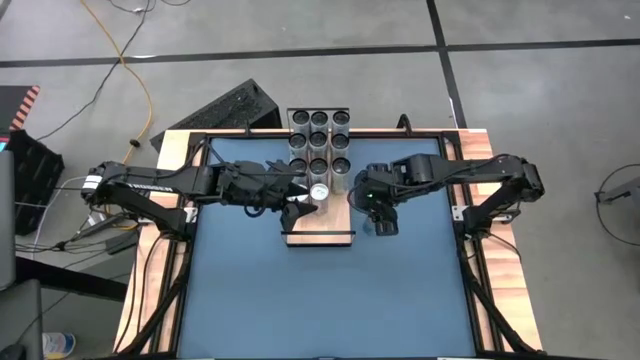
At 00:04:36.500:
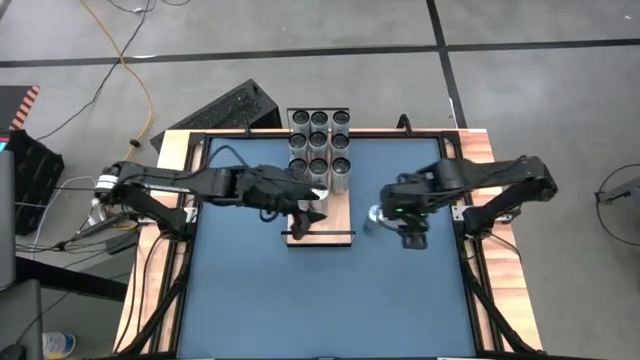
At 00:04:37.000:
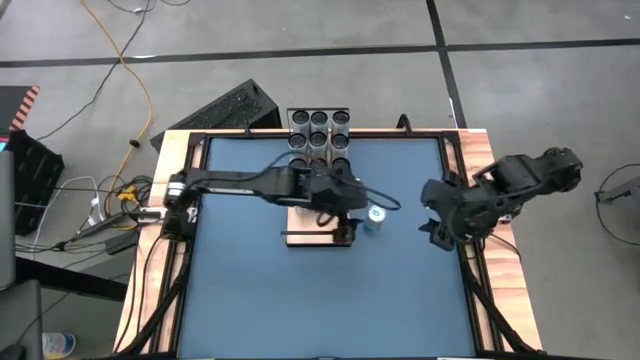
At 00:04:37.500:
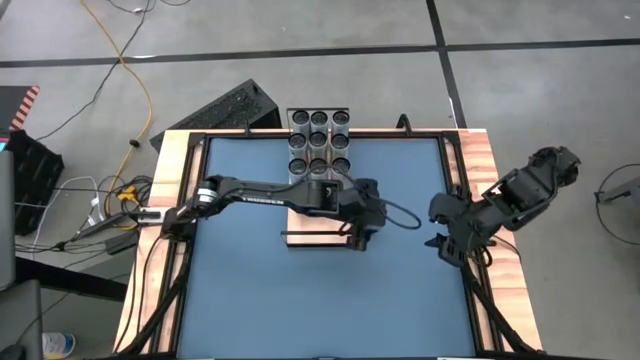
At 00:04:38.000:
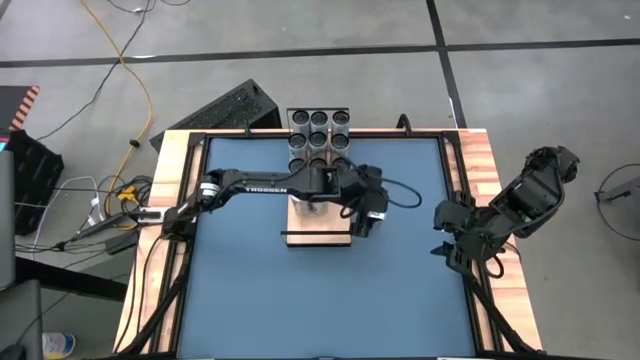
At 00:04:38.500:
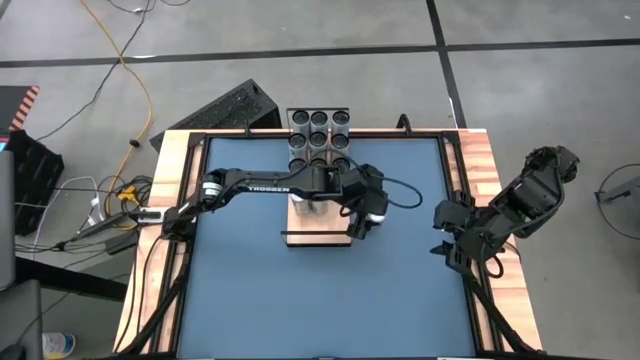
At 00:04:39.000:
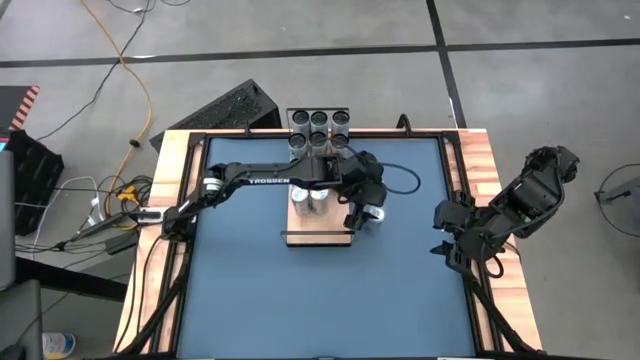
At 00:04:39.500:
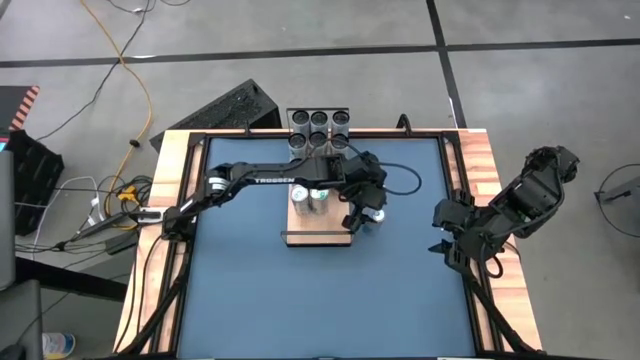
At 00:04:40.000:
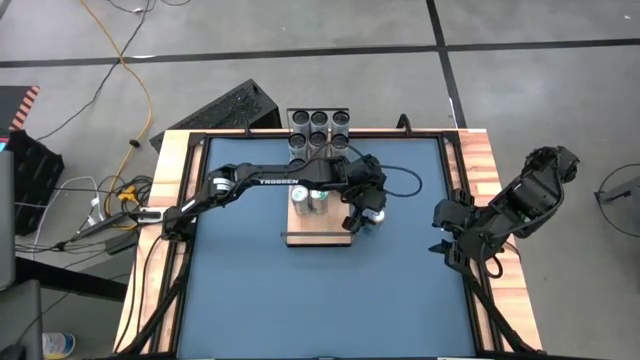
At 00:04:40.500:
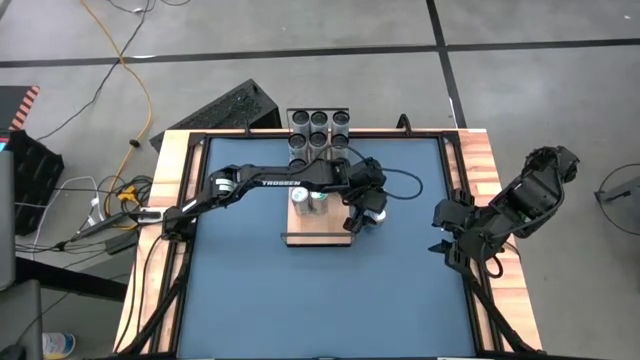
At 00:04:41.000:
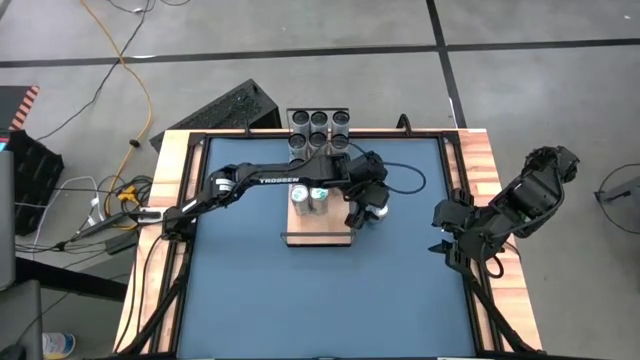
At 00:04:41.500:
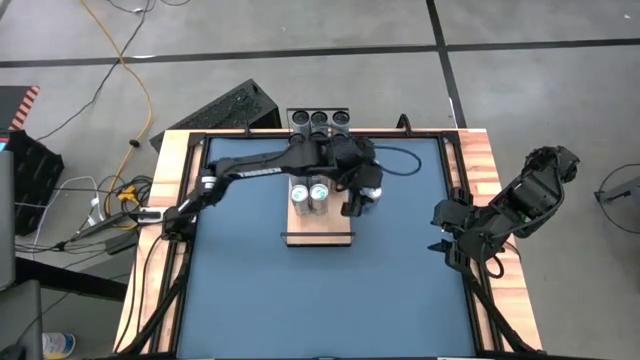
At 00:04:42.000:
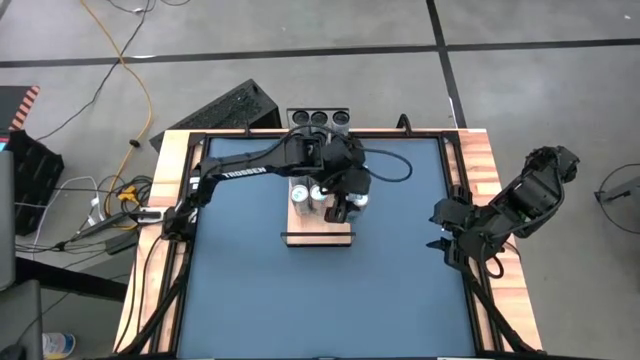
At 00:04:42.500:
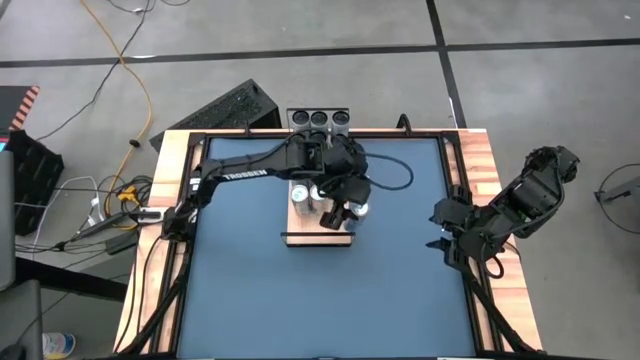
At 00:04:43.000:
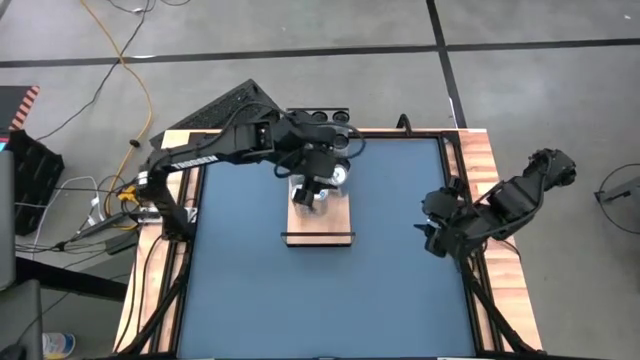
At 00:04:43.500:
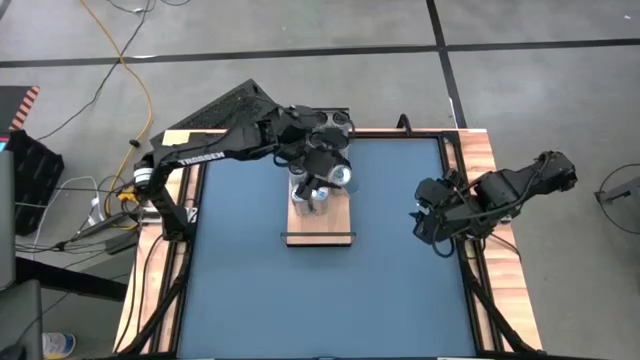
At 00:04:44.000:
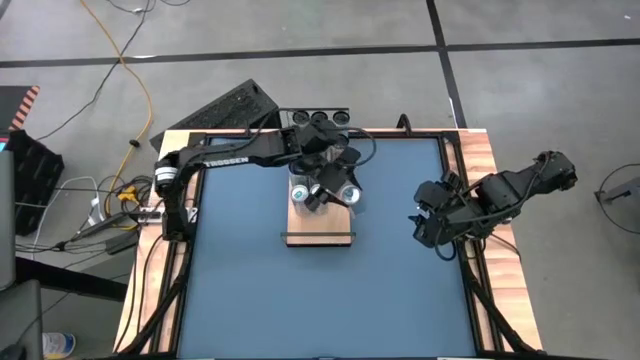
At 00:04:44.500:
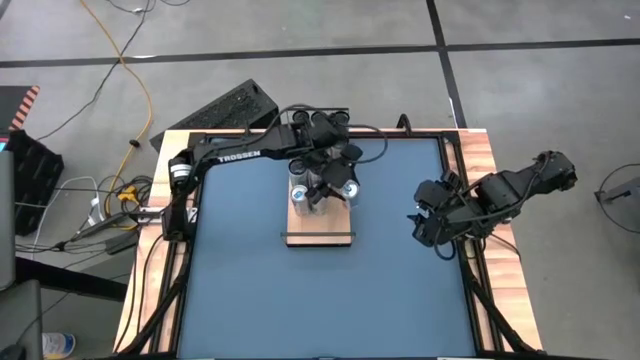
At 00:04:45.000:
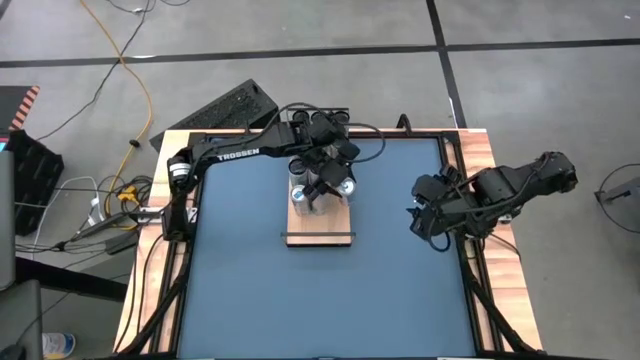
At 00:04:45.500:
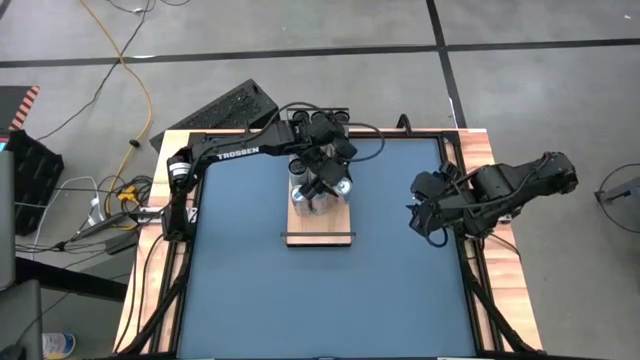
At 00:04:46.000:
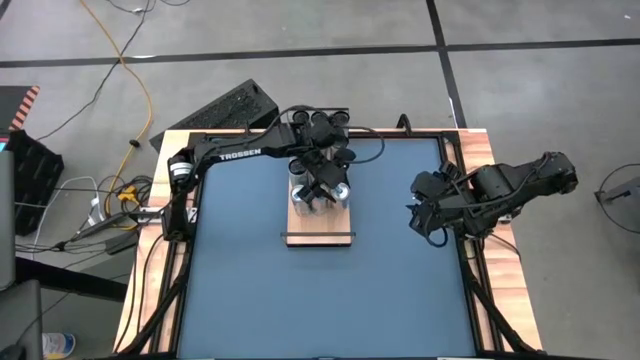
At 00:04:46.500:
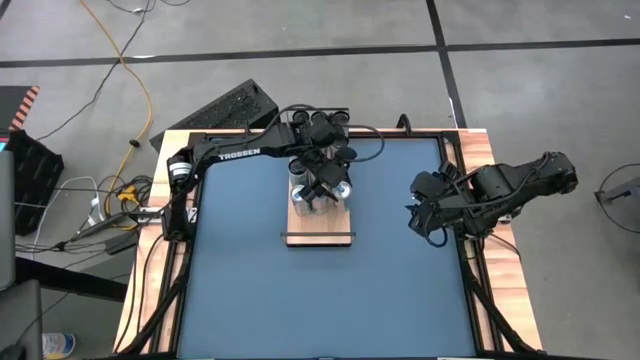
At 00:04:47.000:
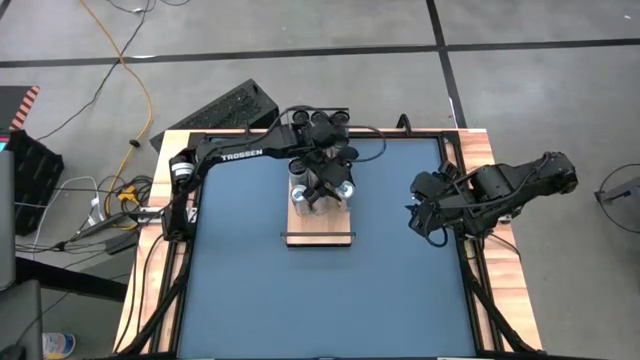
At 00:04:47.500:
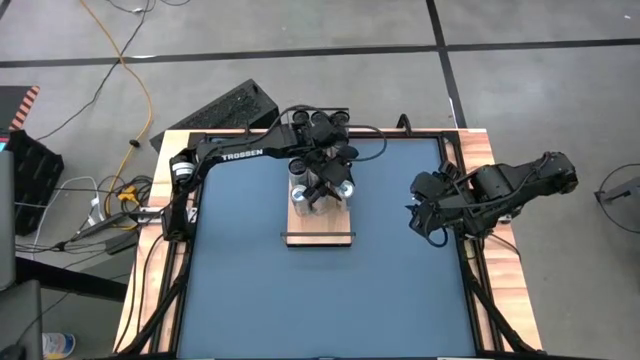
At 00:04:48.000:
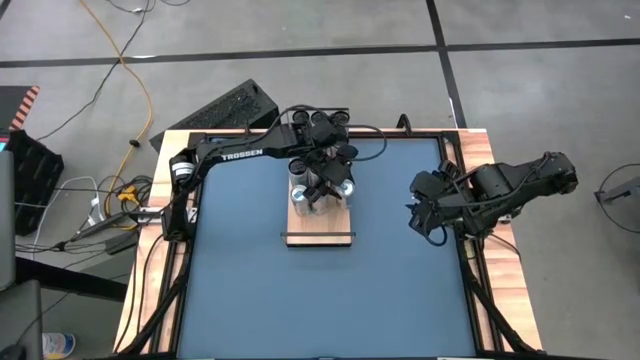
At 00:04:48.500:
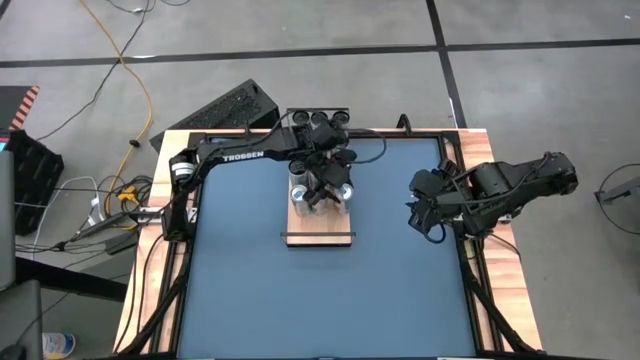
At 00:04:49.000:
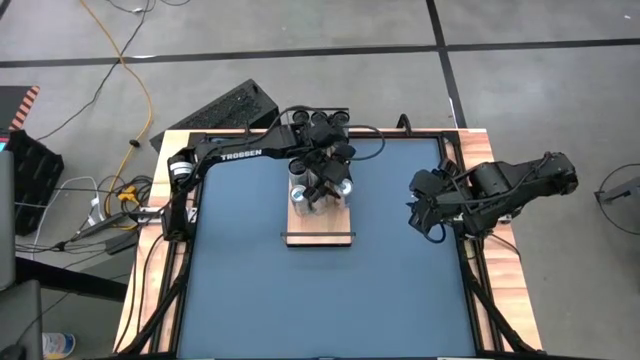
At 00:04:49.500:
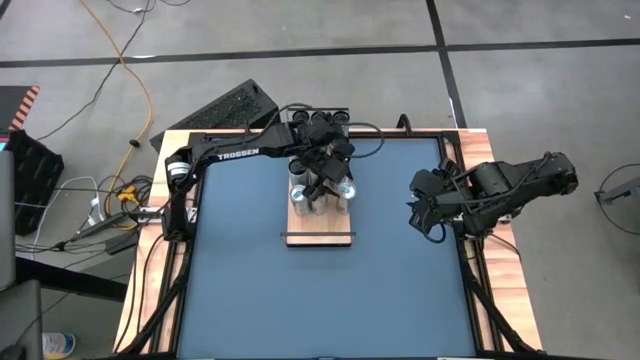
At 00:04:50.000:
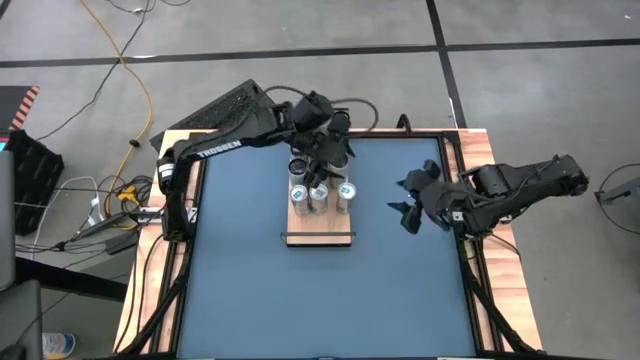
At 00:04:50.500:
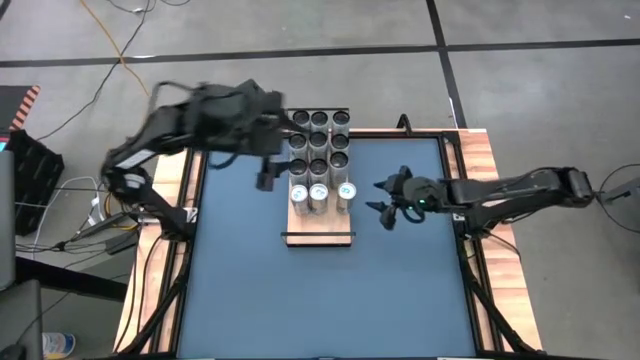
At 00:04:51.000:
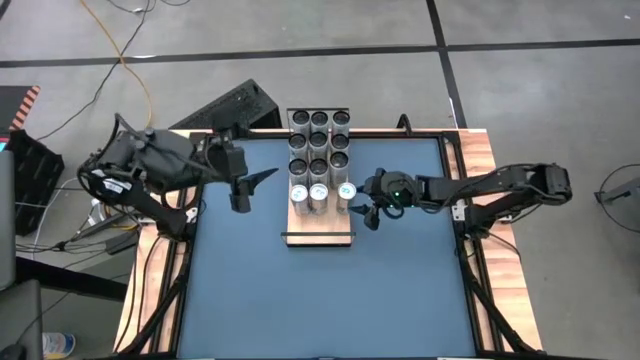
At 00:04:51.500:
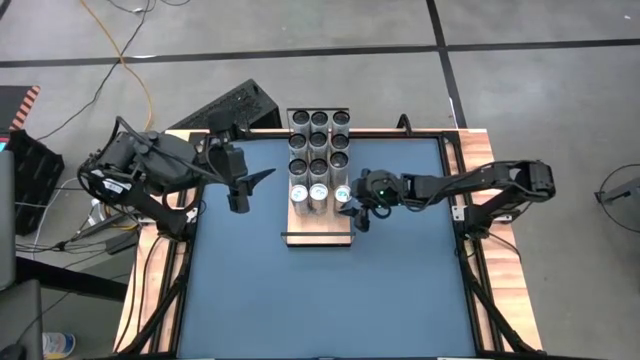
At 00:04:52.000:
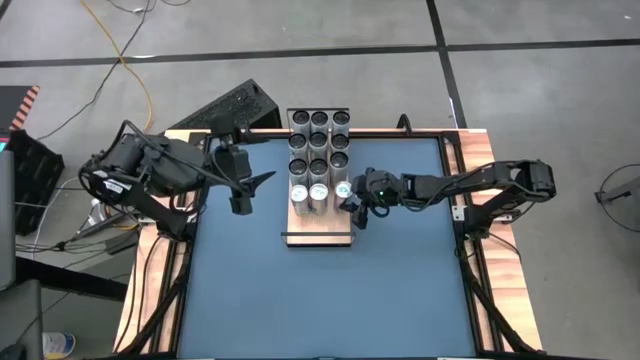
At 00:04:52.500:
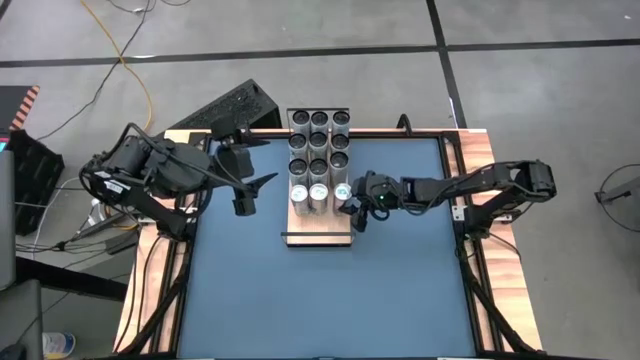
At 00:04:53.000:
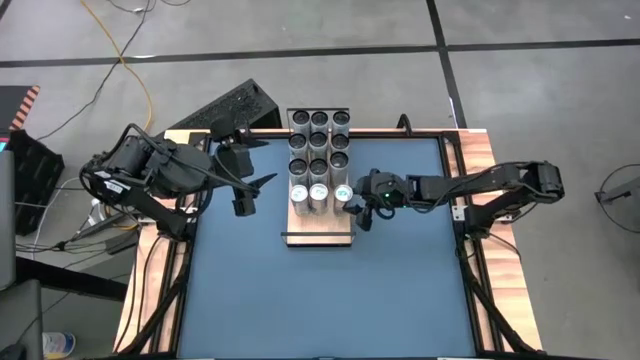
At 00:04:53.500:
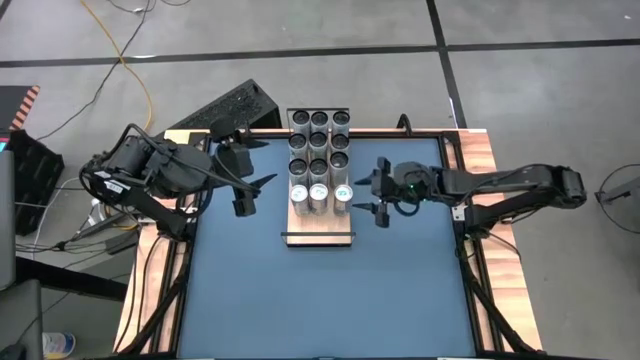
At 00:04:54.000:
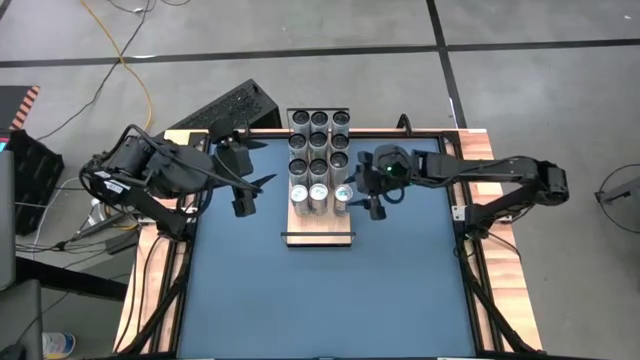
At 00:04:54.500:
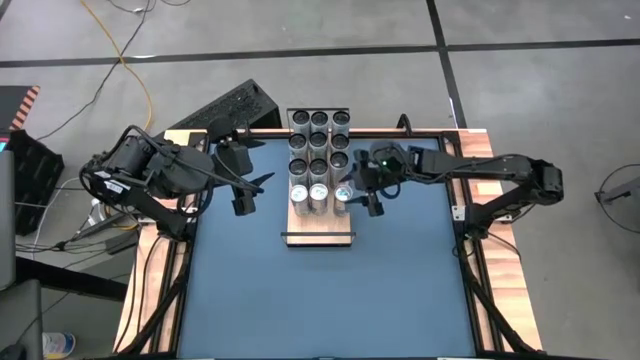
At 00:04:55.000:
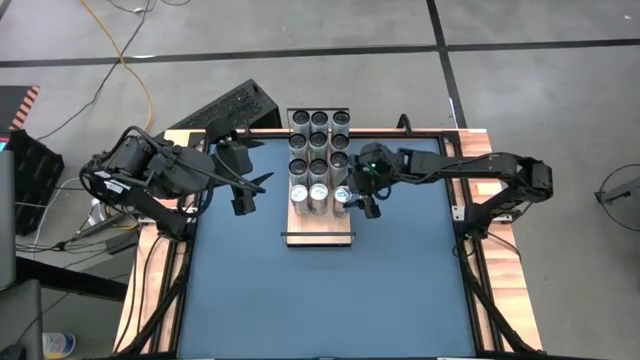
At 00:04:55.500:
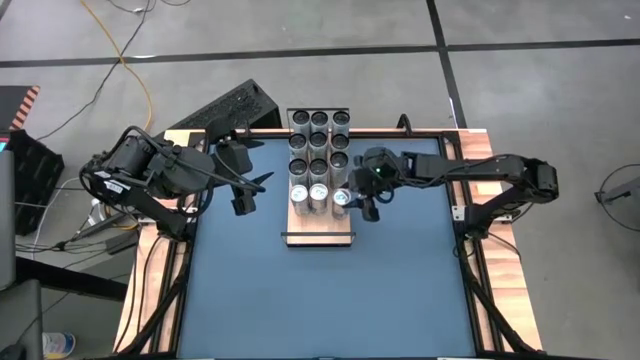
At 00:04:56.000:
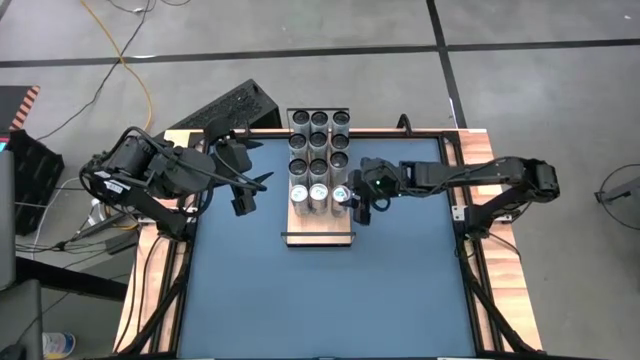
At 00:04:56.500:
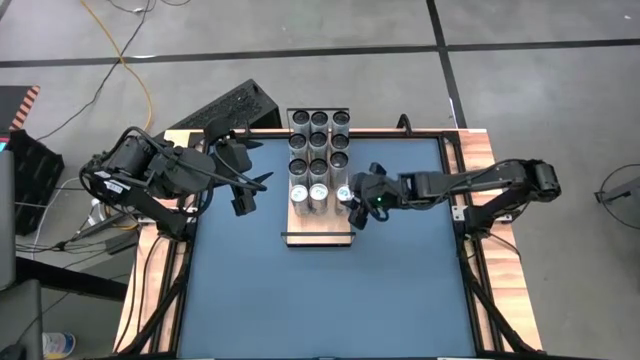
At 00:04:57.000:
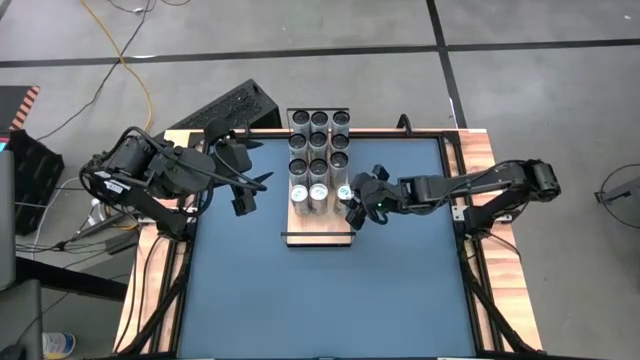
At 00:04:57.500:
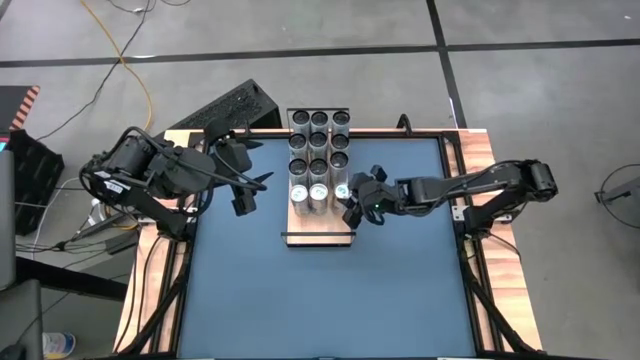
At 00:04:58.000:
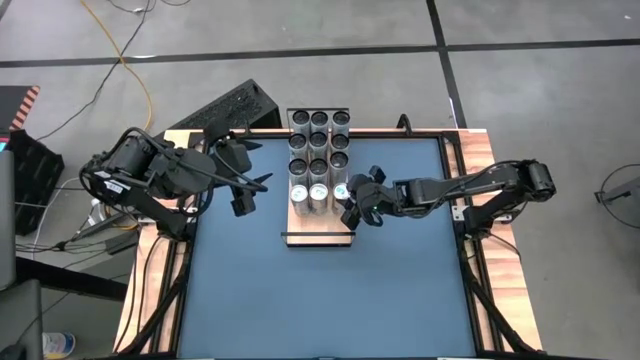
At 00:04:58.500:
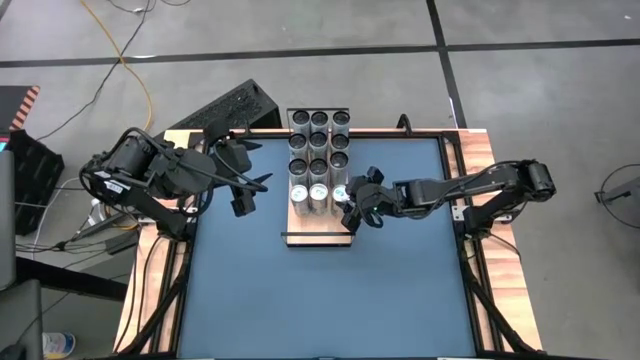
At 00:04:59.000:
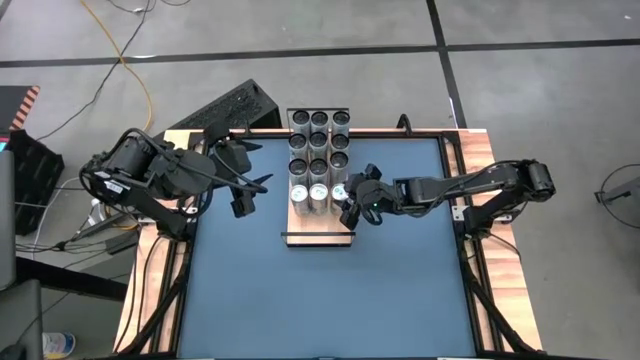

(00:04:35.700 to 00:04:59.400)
Task: Place canned beverage on shelf
Put the blue soda can on the shelf
